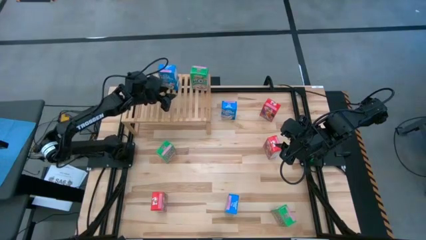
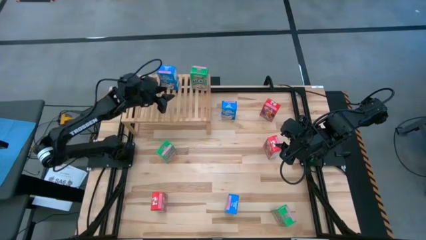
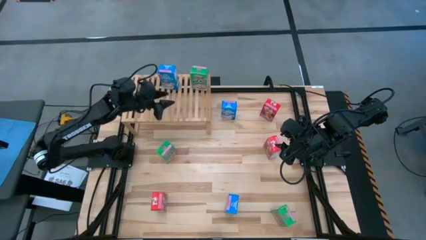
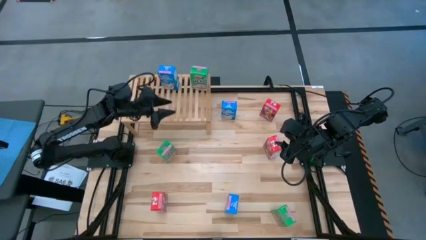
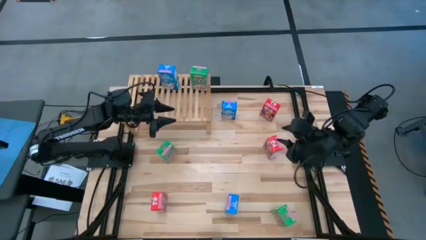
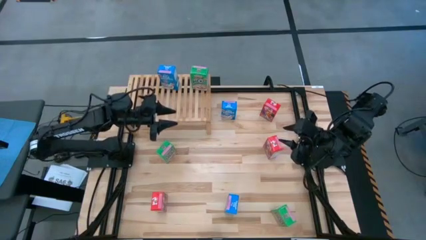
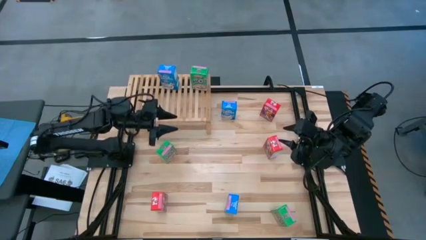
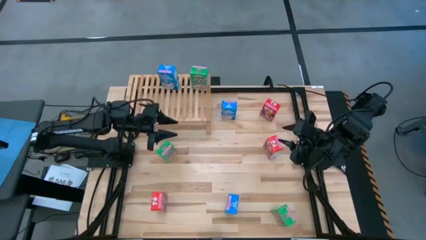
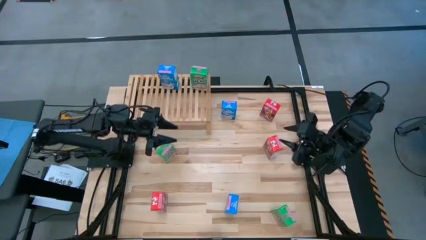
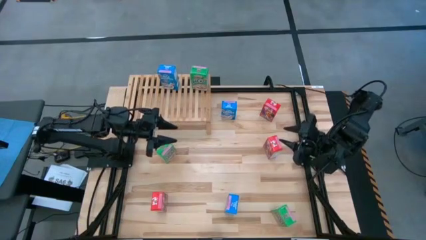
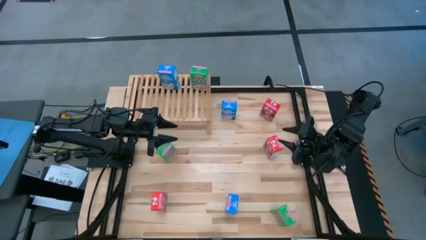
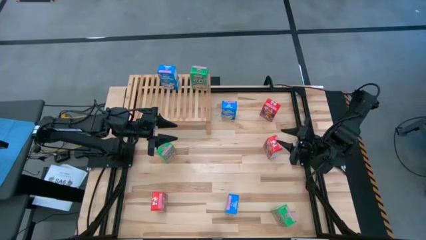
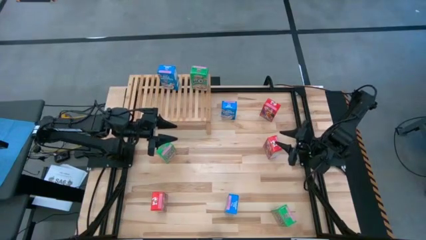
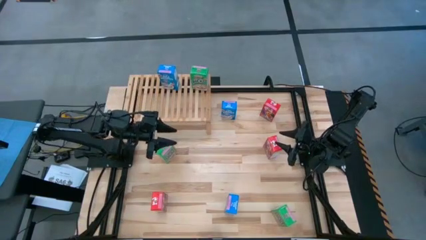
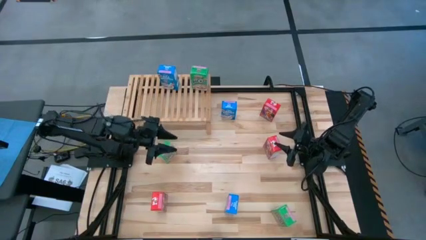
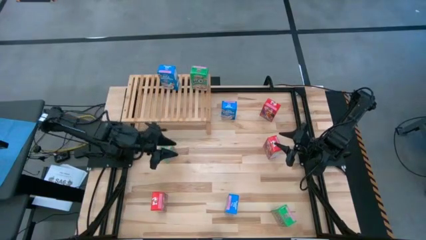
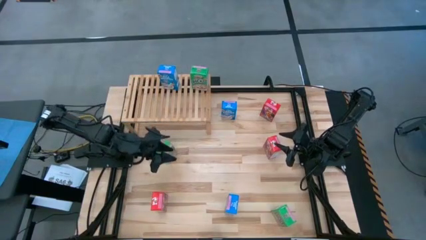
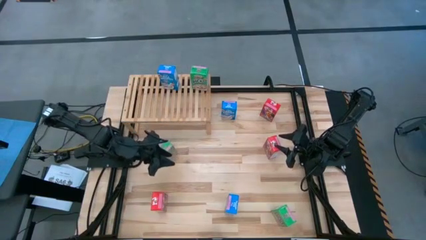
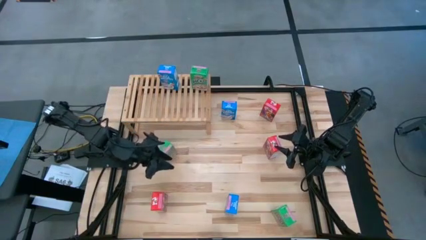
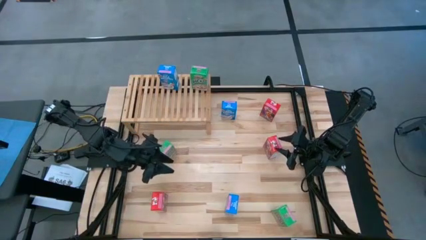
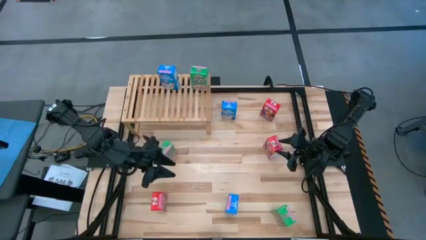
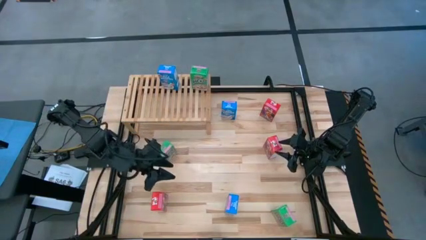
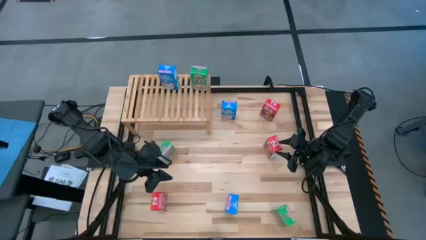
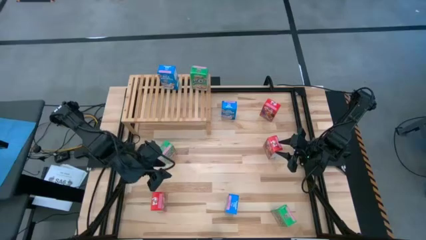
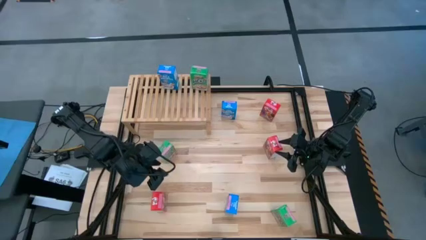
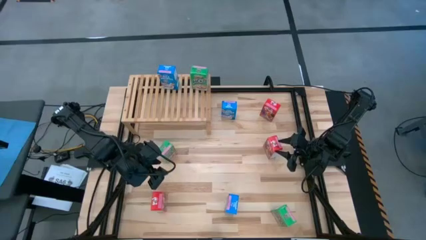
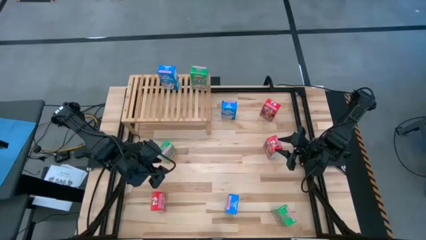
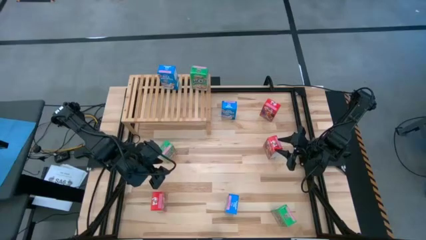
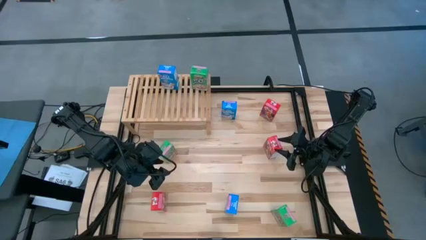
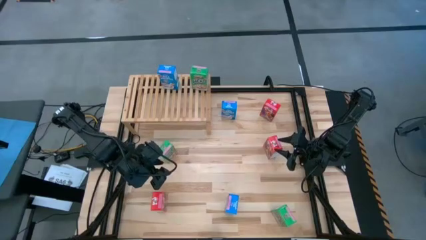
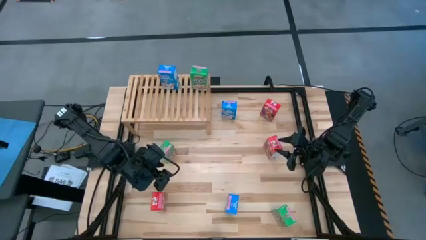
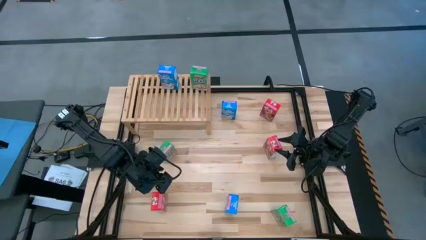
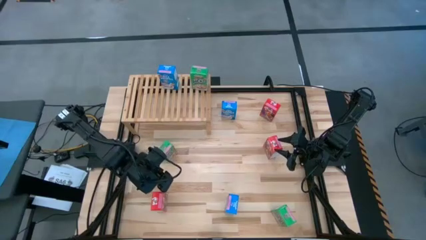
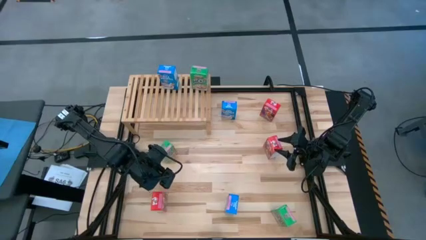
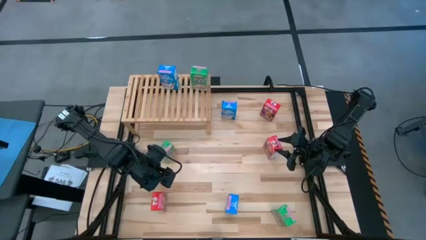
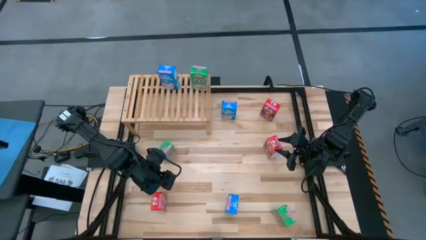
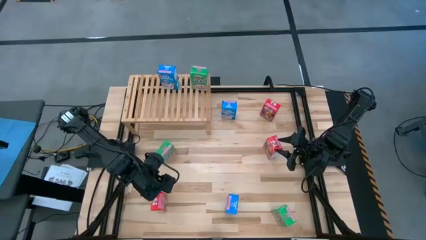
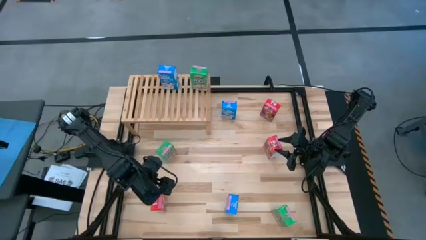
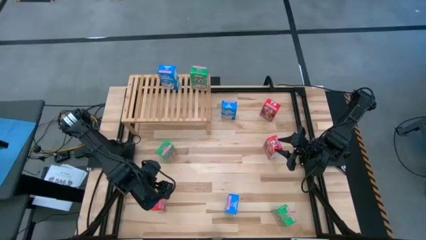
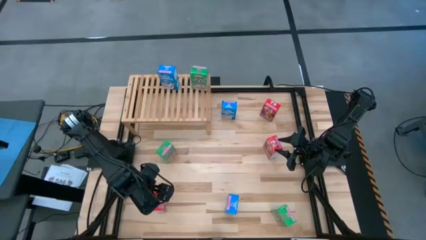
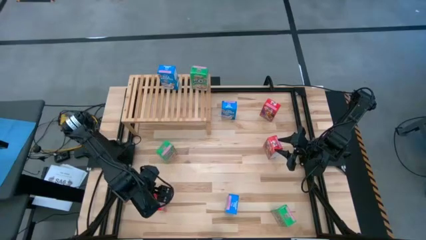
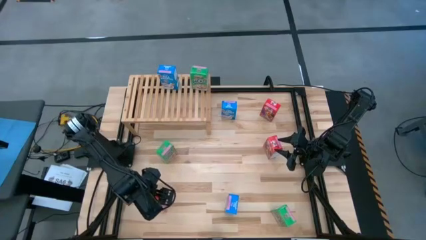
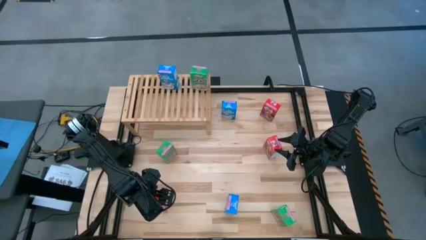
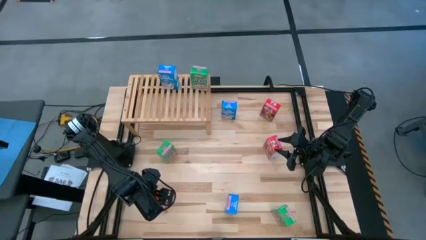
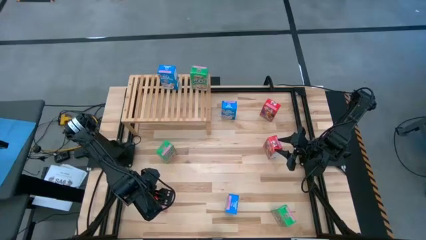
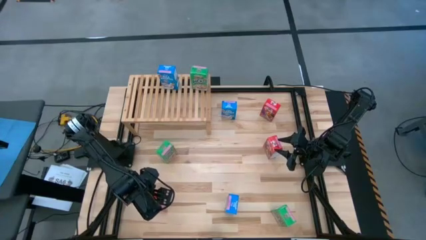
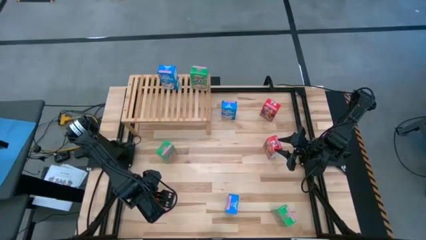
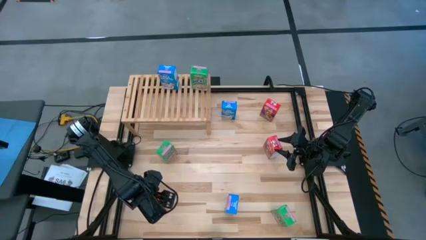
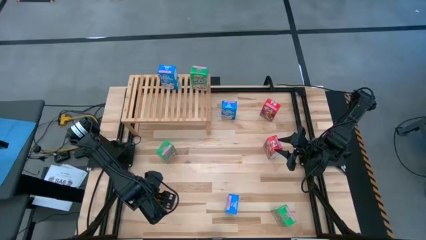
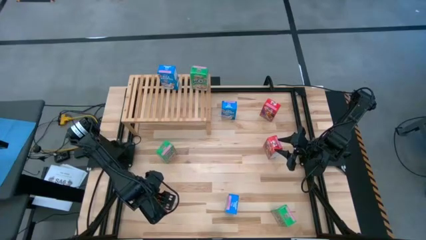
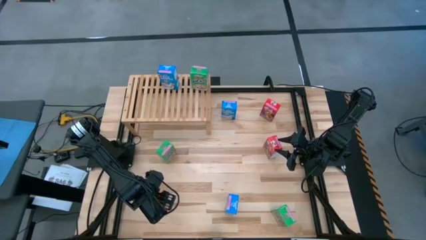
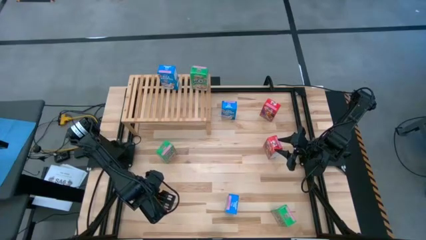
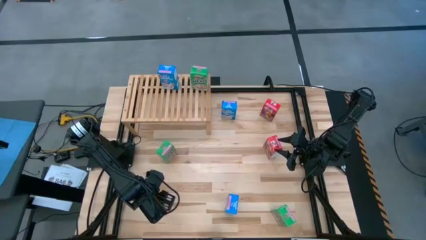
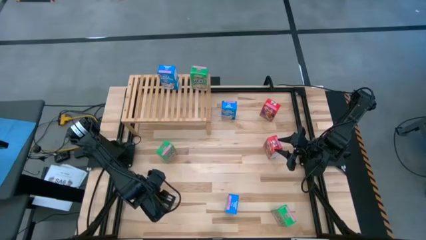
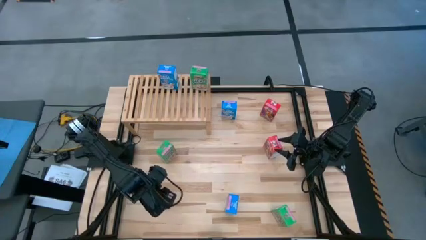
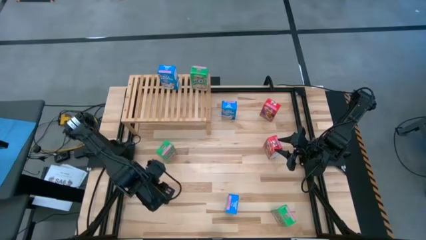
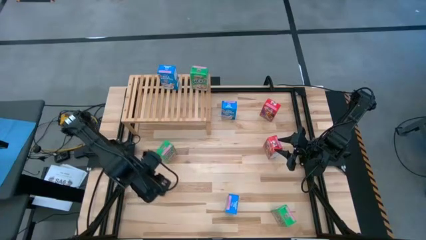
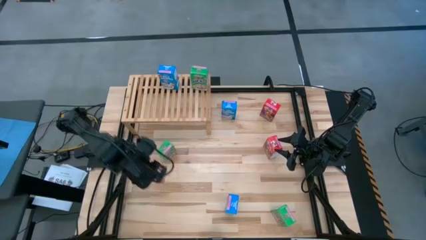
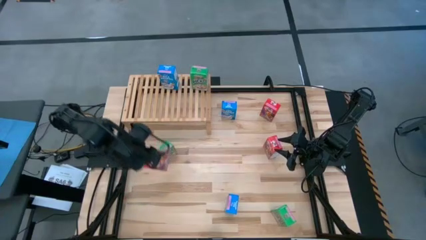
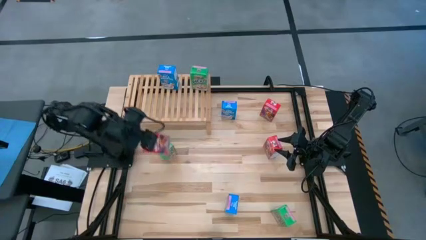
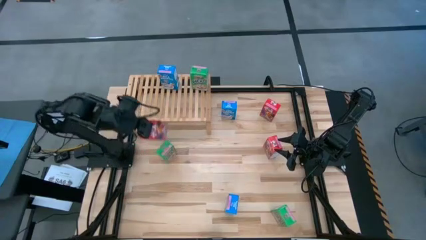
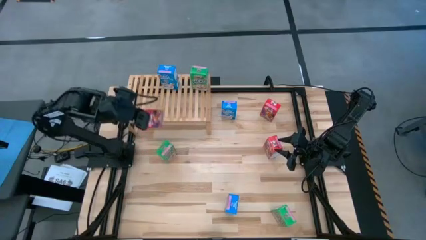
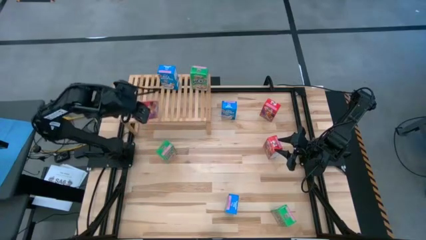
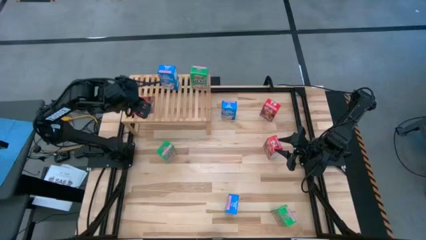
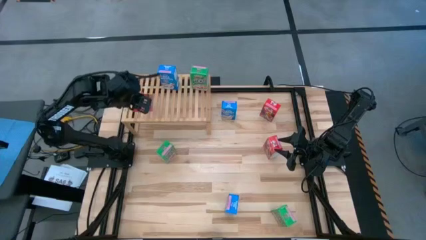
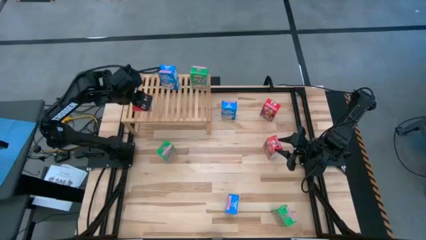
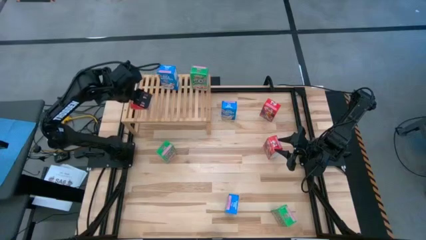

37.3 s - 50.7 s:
Task: Stack cereal on shelf
Put the bottom red cereal box on the shelf
